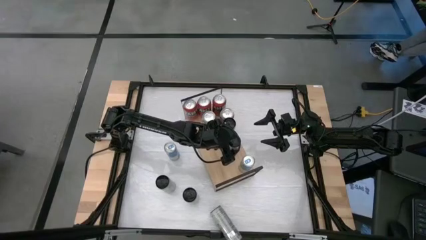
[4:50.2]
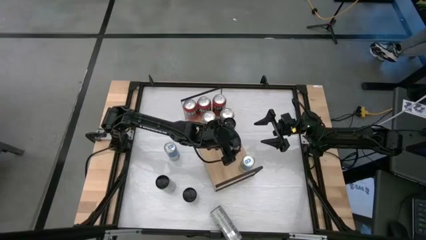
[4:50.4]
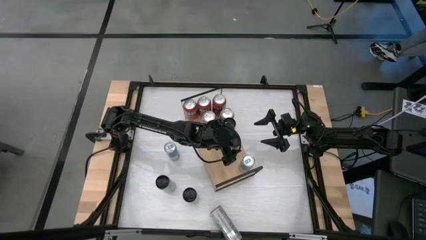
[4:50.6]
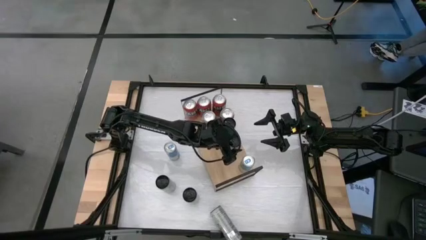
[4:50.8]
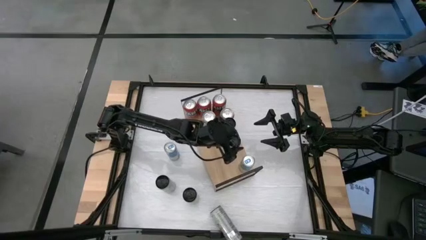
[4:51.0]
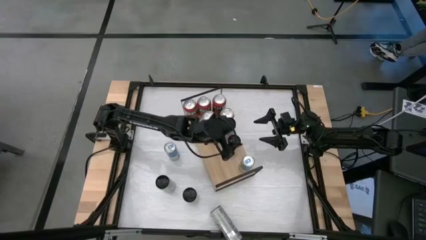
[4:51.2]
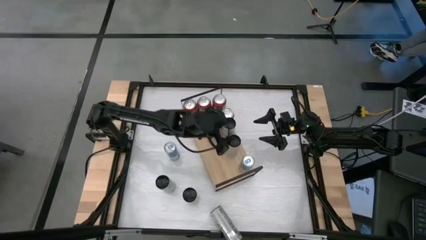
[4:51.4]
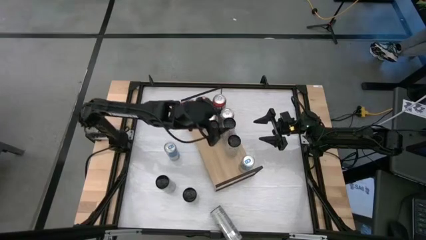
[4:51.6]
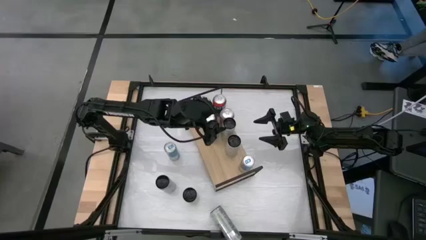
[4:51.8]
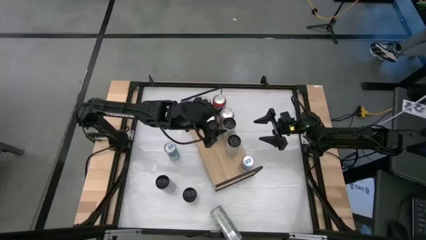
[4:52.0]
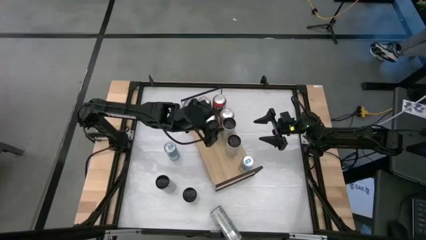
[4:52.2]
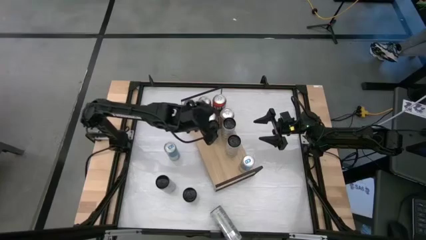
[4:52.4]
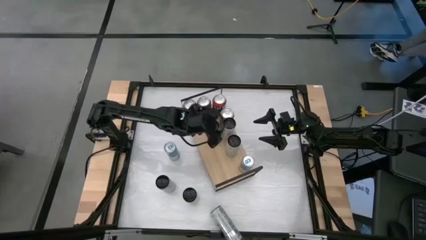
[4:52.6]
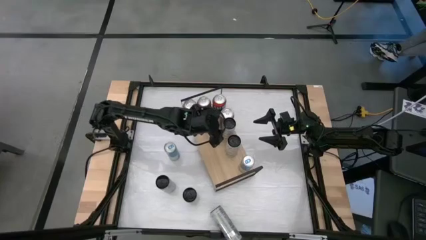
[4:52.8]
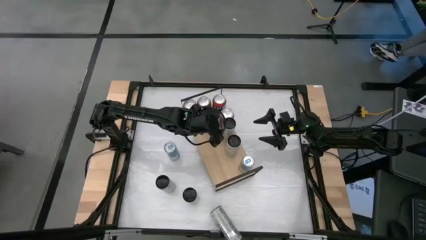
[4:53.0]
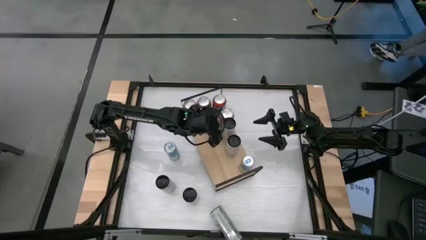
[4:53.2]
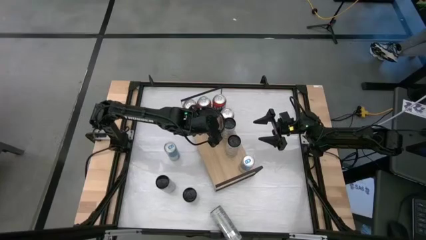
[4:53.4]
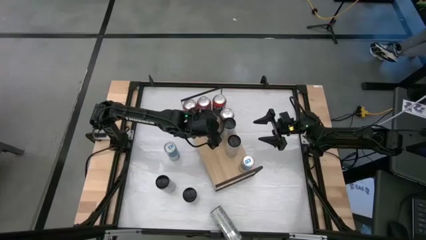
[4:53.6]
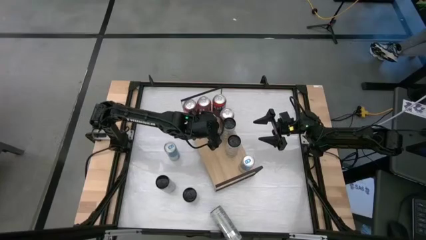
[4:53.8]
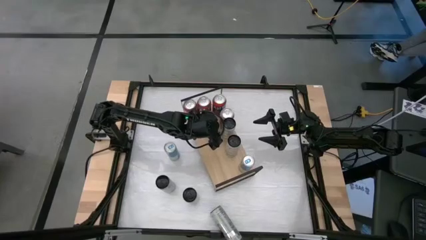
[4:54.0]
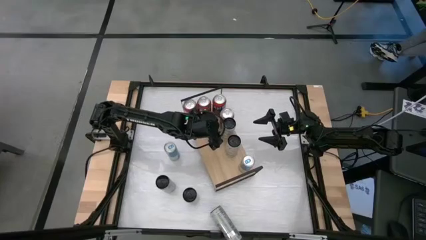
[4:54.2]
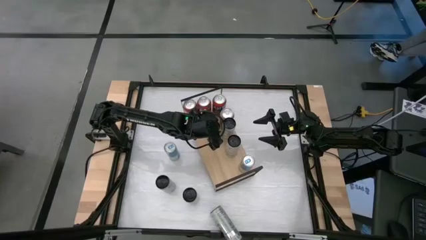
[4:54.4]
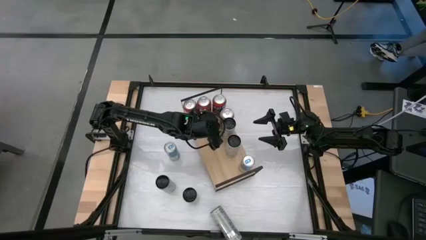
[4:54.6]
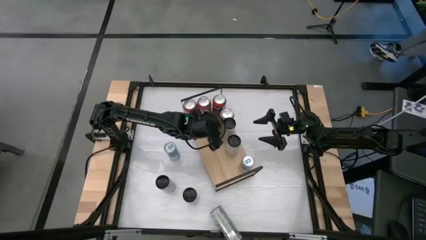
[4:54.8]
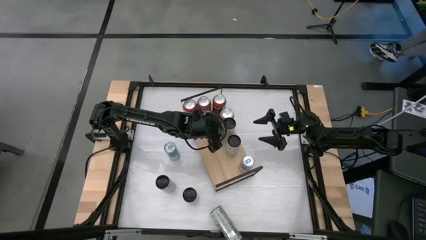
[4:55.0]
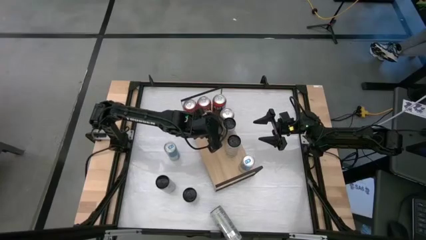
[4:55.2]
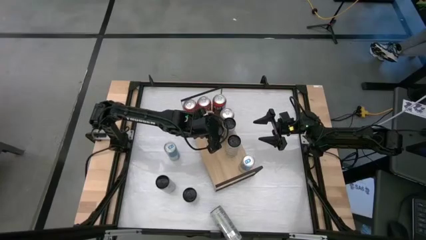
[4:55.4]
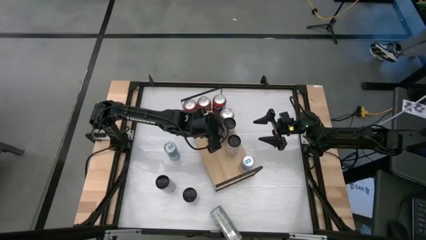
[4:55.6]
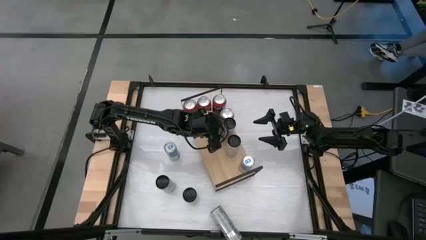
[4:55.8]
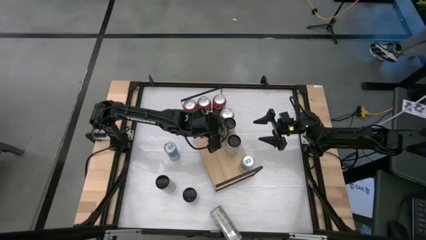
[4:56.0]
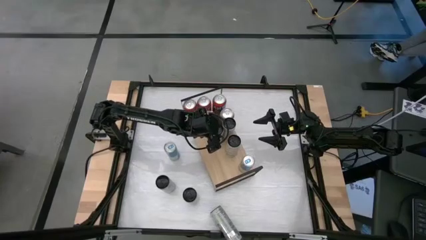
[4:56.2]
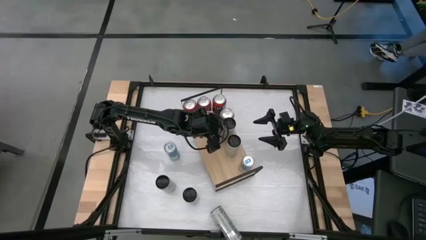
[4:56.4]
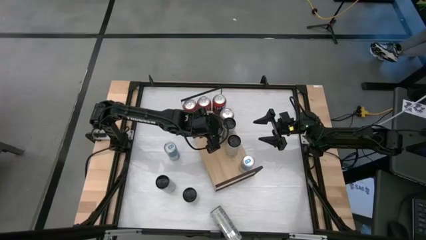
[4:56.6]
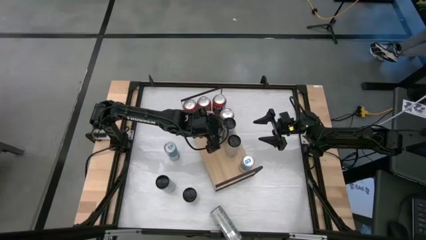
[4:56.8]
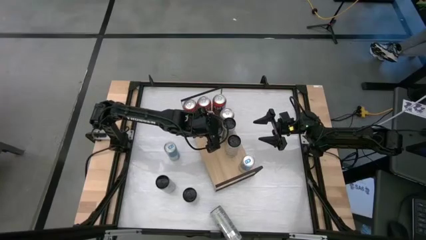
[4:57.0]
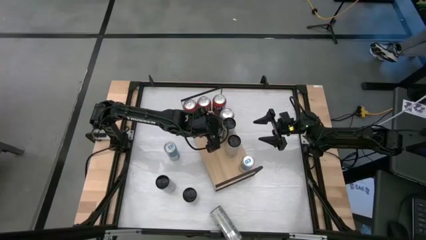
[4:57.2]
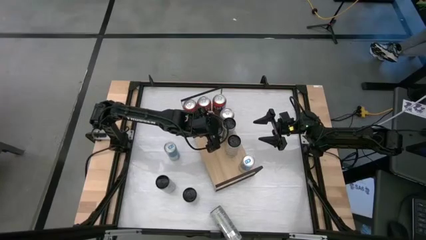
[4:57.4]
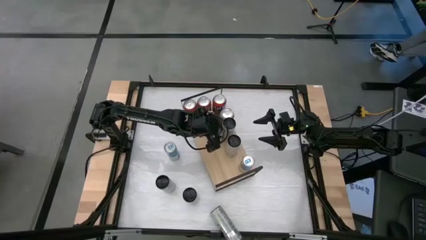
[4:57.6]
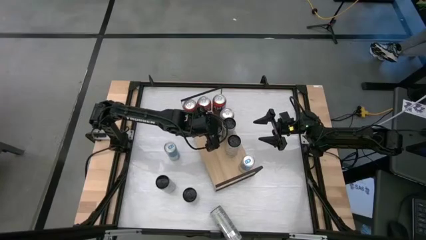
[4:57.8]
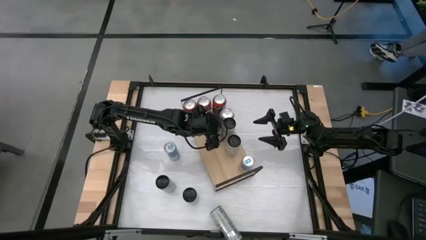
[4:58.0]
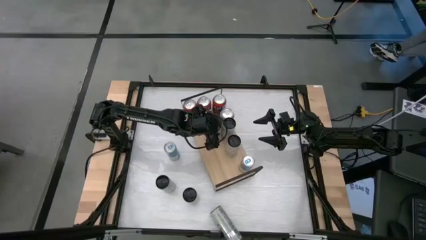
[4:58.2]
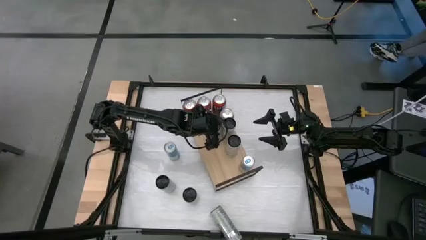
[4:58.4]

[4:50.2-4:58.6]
Task: Place canned beverage on shelf
Adjust the yellow soda can on the shelf

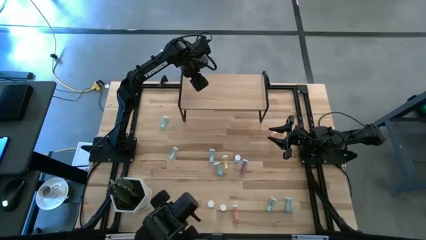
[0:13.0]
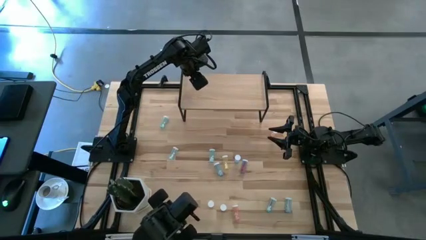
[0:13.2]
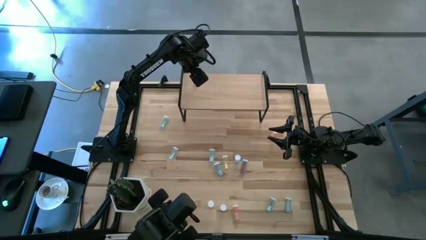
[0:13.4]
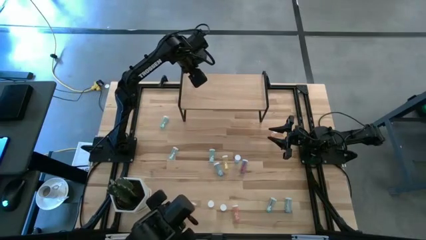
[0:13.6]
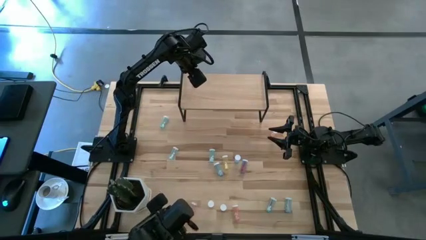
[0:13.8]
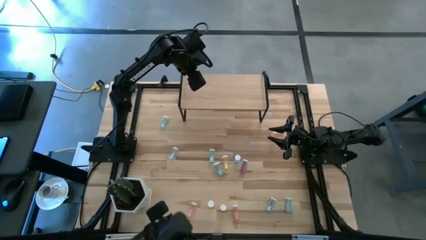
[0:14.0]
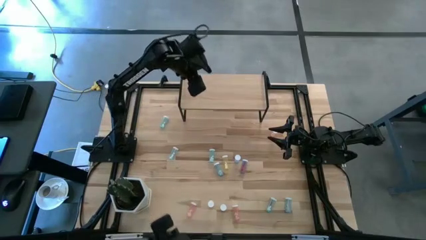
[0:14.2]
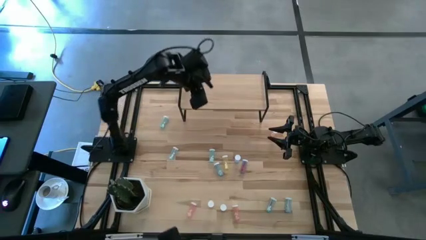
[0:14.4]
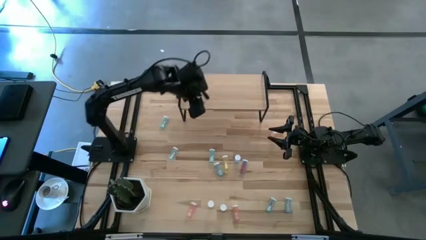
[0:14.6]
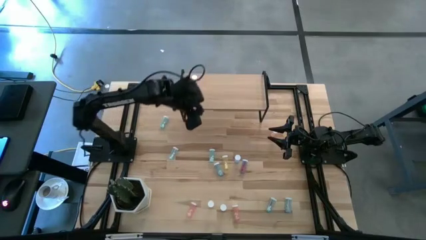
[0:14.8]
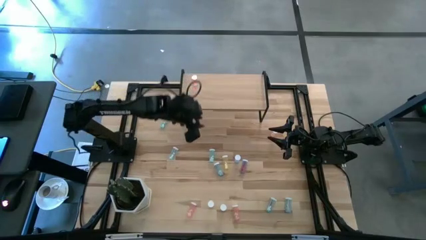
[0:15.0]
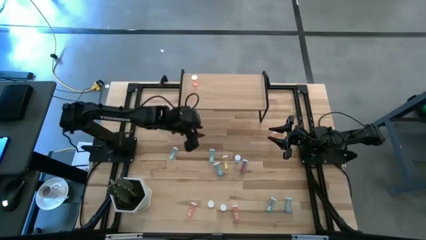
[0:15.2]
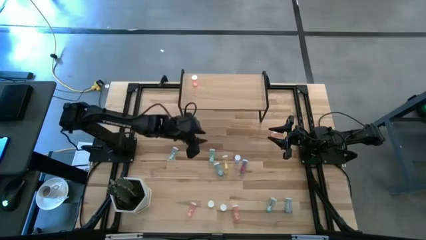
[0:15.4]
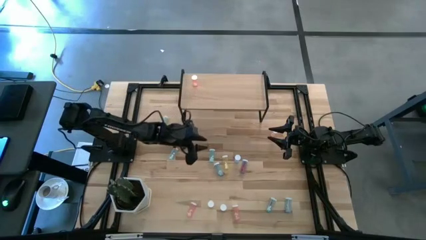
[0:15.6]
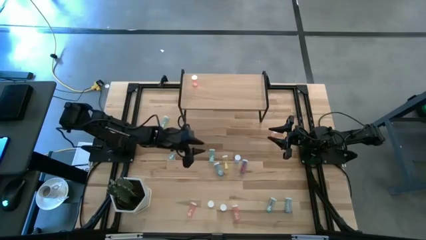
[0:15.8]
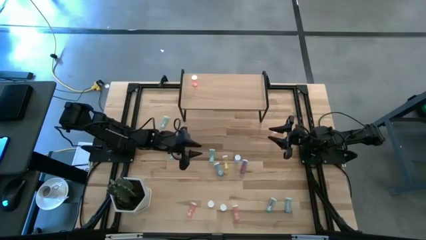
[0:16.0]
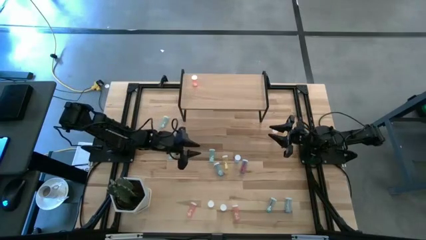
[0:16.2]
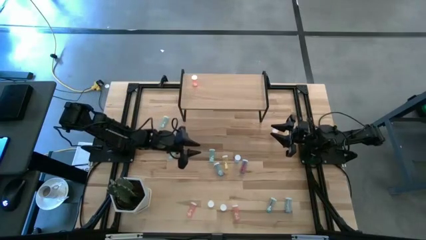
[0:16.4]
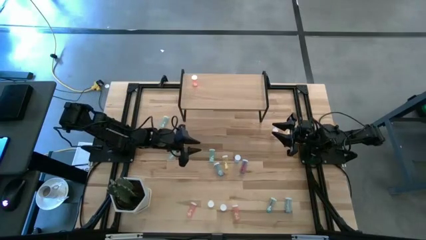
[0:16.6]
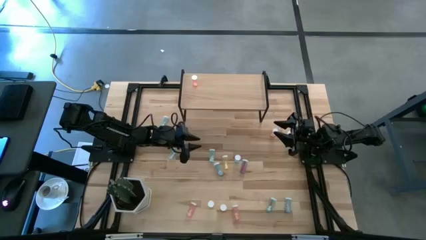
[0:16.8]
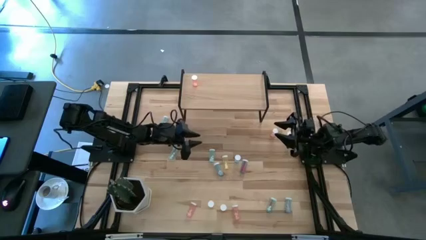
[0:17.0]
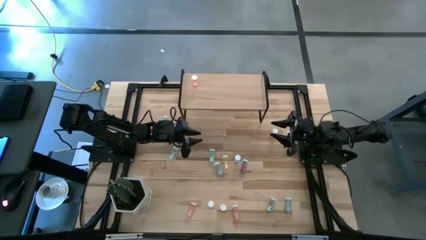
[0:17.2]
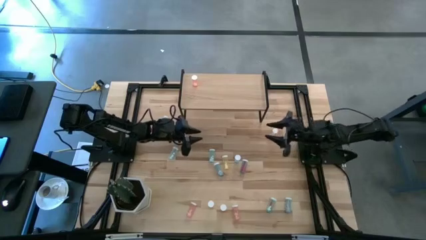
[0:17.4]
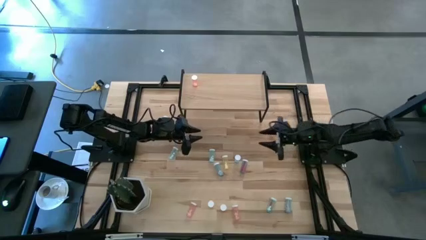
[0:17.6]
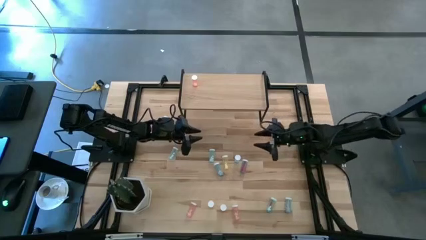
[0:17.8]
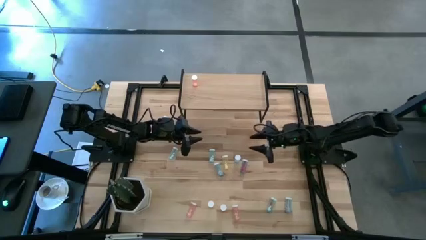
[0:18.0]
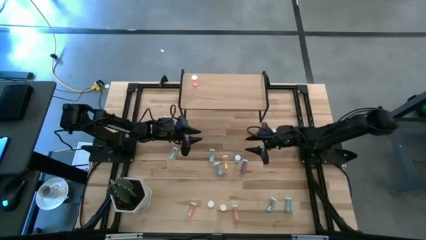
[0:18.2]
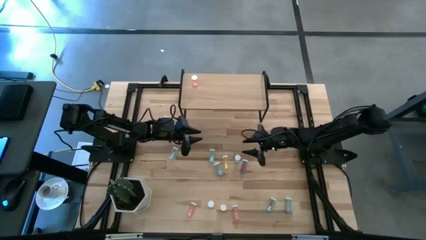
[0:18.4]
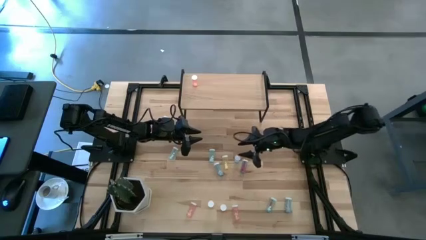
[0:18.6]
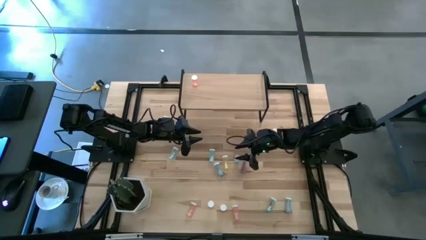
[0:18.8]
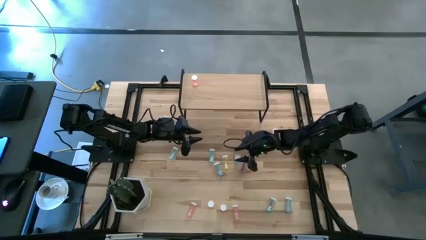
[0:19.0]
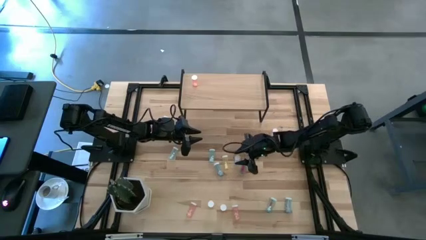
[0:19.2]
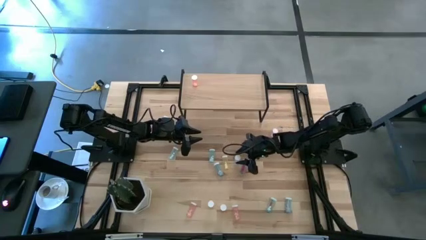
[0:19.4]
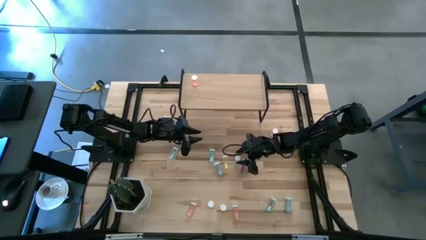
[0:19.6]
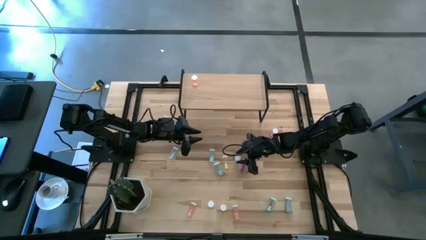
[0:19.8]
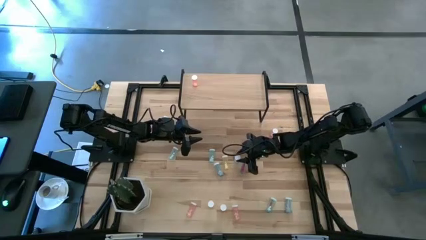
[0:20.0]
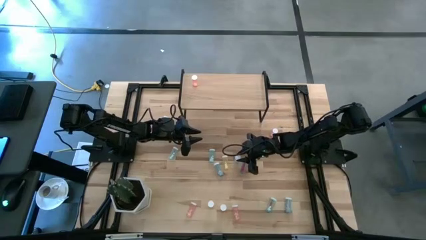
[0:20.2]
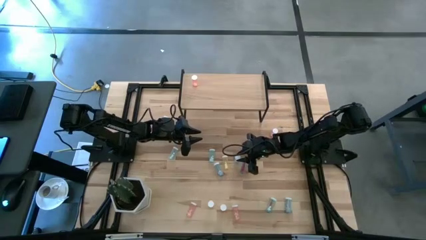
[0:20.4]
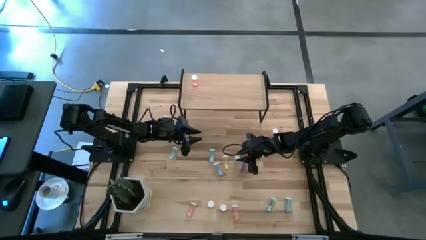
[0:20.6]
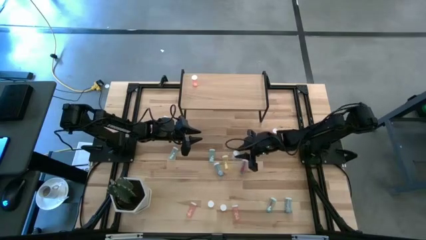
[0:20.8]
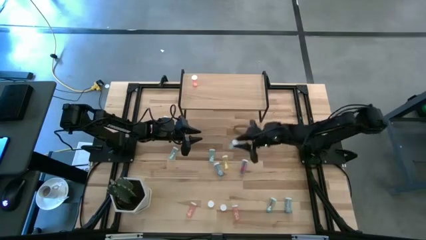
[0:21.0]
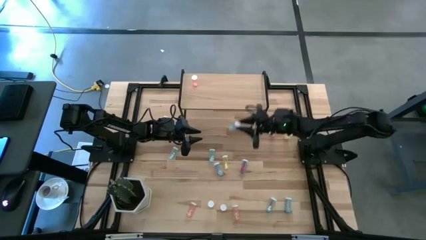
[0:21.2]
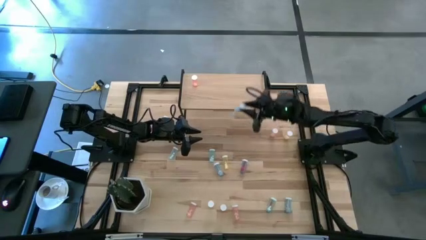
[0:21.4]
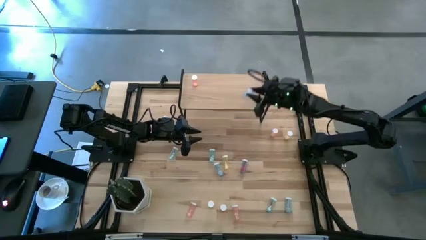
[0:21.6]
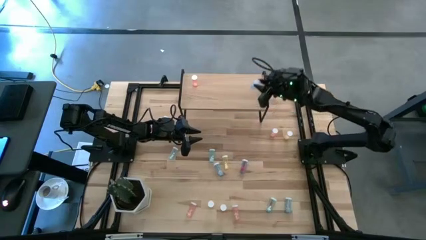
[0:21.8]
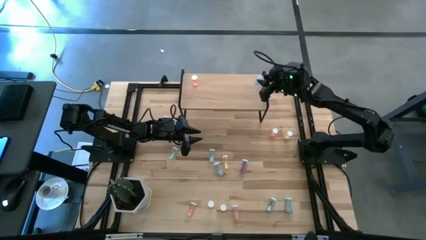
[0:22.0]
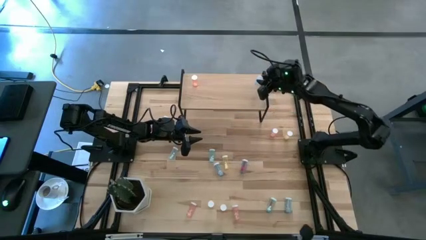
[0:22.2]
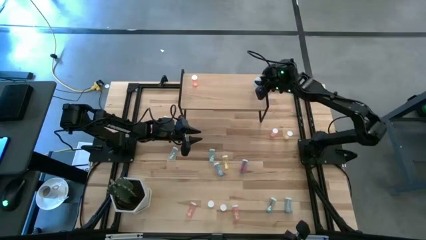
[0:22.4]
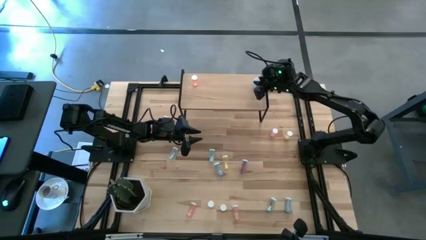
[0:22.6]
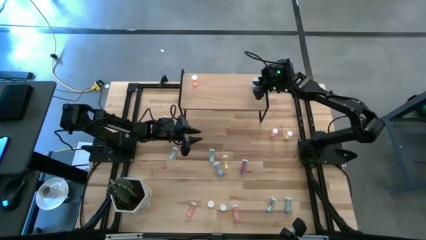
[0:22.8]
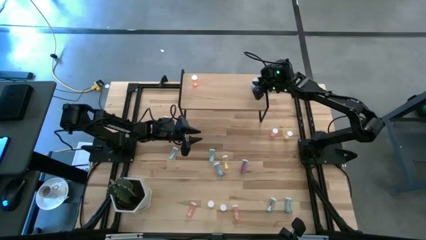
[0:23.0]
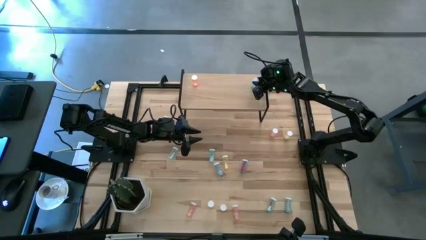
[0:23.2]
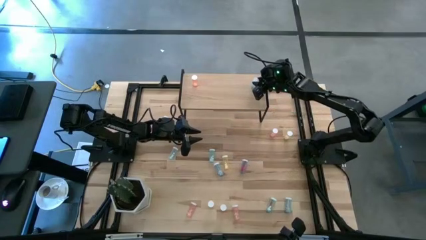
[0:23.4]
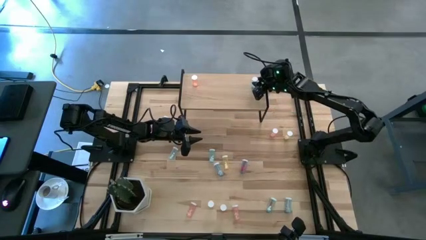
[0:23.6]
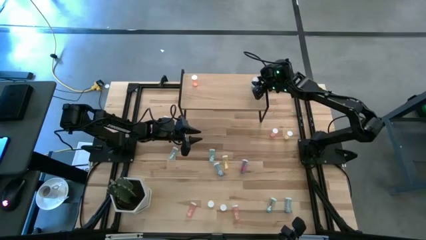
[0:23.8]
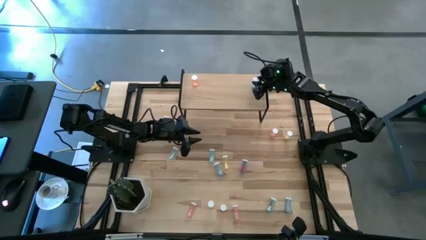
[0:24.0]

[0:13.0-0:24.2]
Task: Pick and place medicine bottles onto shelf by color
Put the blue pill bottle on the shelf
